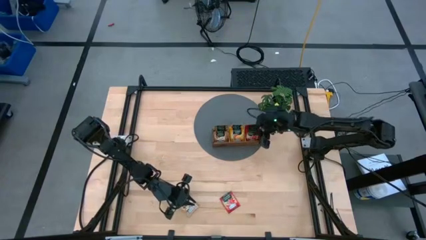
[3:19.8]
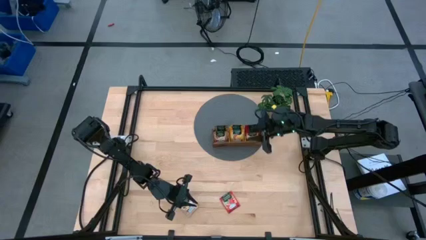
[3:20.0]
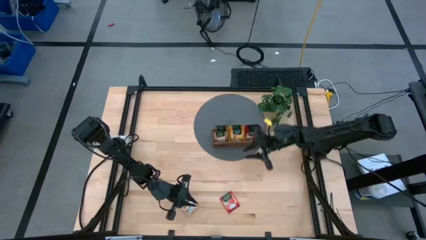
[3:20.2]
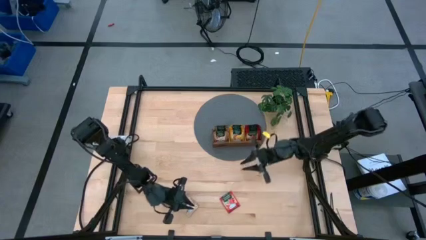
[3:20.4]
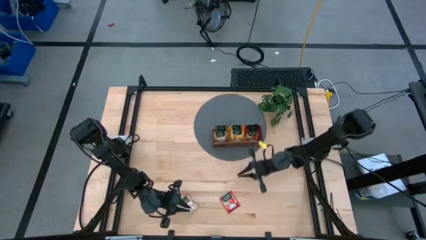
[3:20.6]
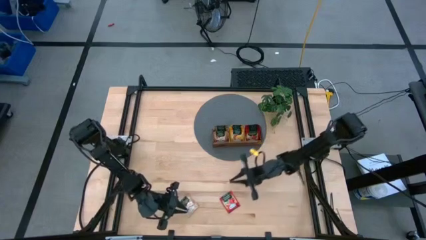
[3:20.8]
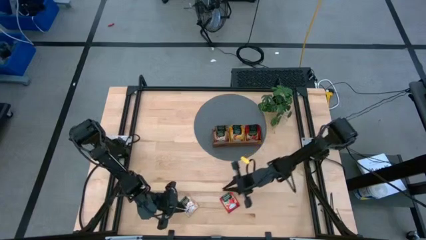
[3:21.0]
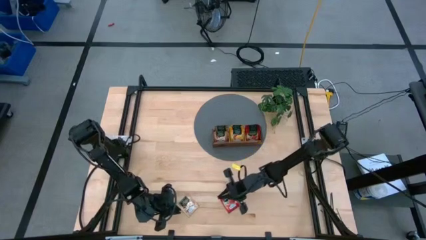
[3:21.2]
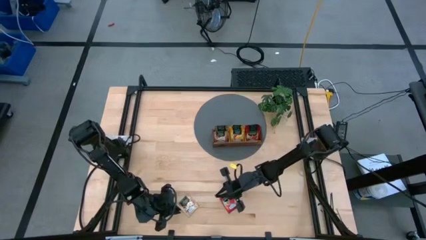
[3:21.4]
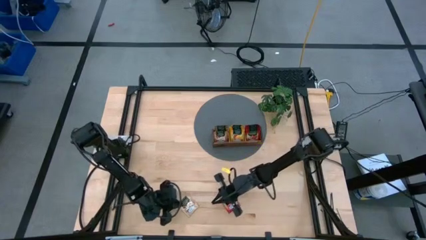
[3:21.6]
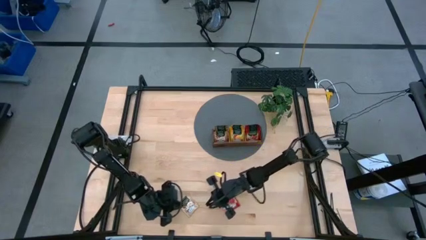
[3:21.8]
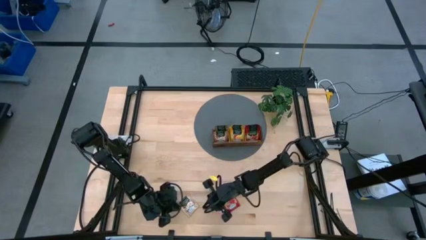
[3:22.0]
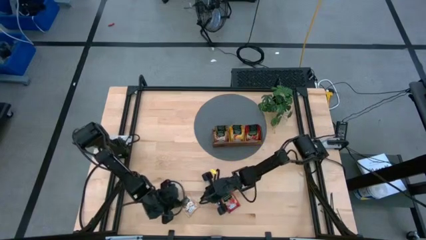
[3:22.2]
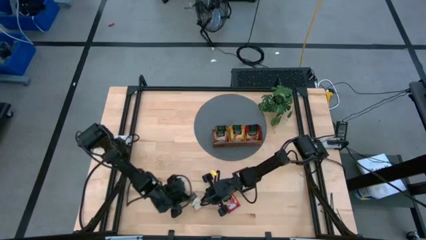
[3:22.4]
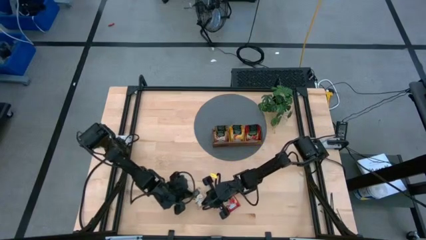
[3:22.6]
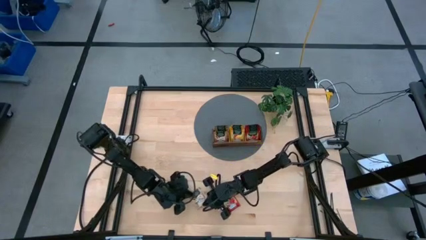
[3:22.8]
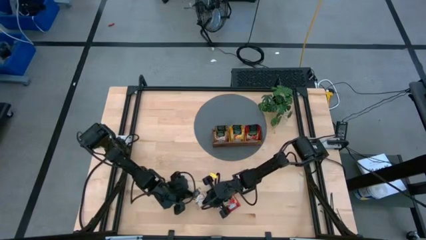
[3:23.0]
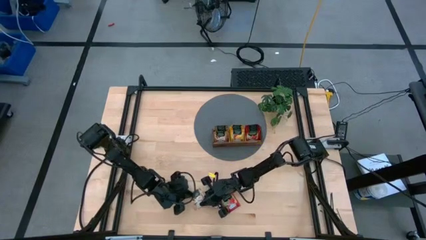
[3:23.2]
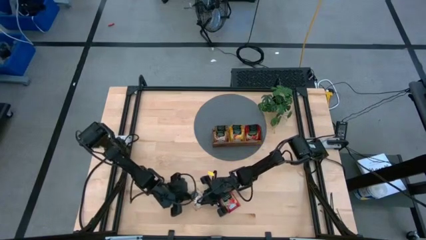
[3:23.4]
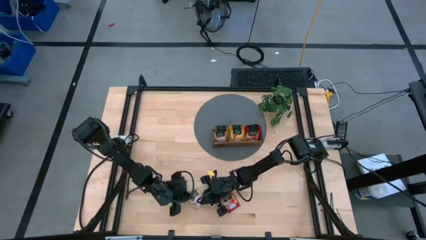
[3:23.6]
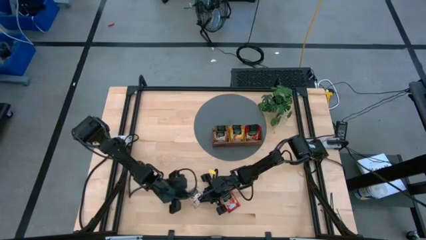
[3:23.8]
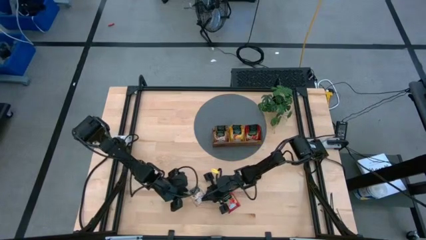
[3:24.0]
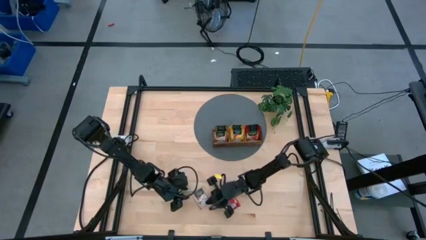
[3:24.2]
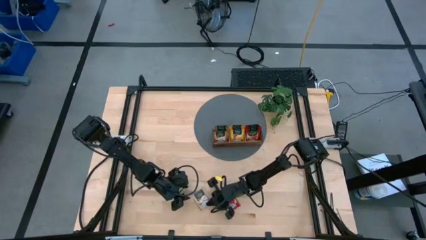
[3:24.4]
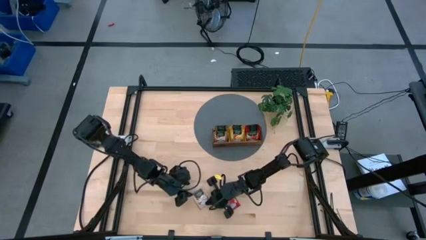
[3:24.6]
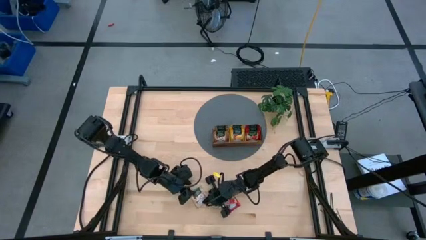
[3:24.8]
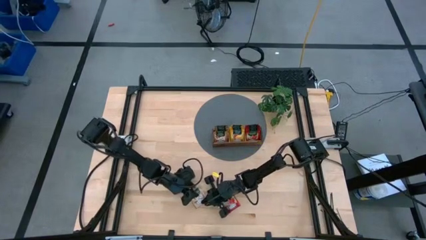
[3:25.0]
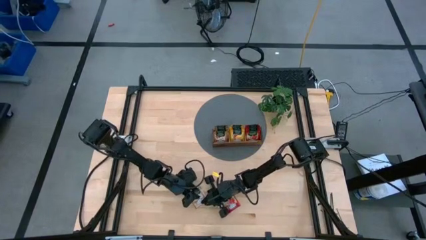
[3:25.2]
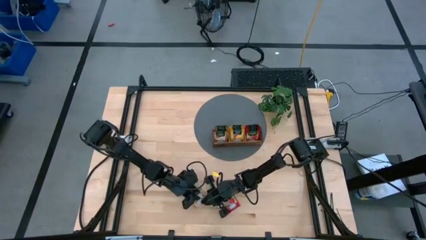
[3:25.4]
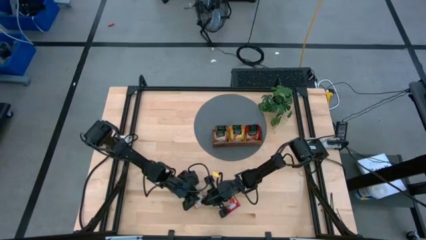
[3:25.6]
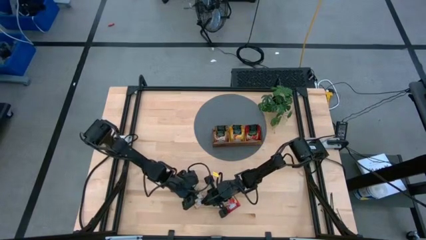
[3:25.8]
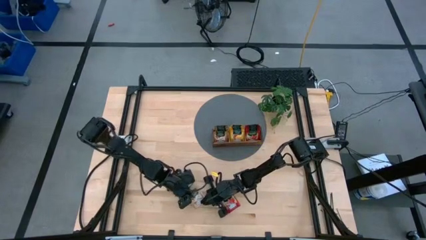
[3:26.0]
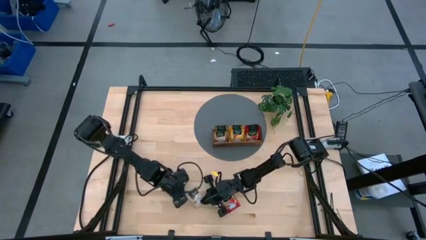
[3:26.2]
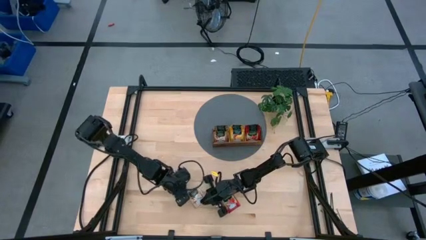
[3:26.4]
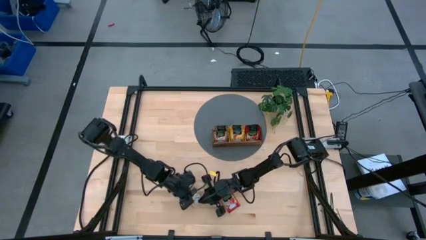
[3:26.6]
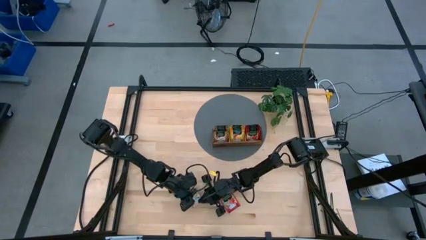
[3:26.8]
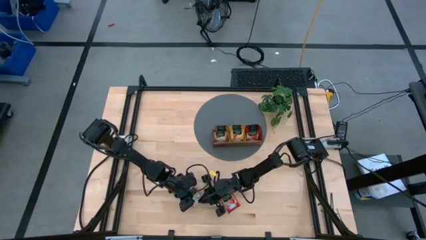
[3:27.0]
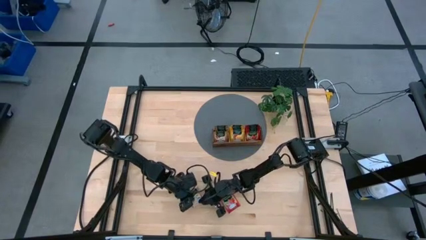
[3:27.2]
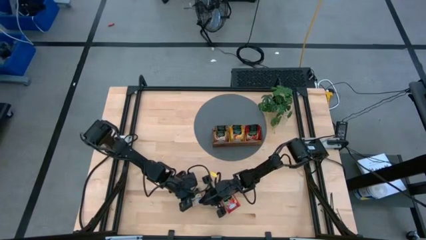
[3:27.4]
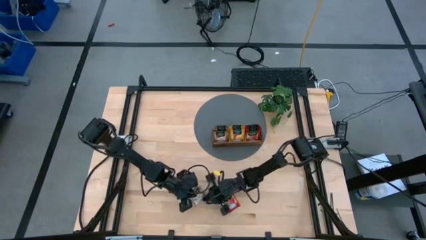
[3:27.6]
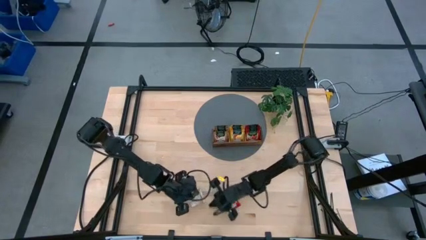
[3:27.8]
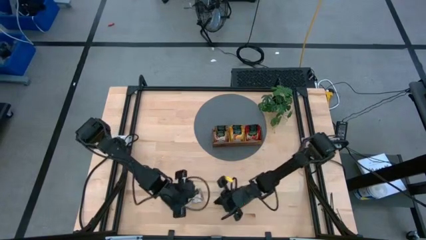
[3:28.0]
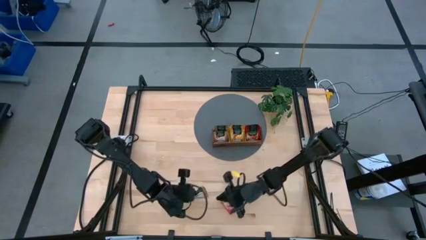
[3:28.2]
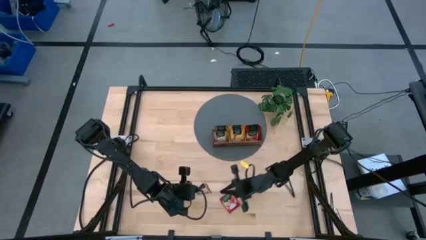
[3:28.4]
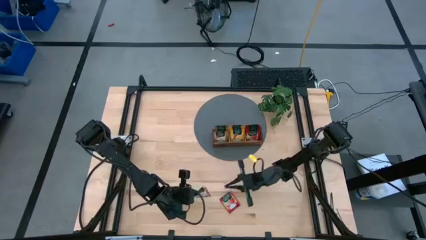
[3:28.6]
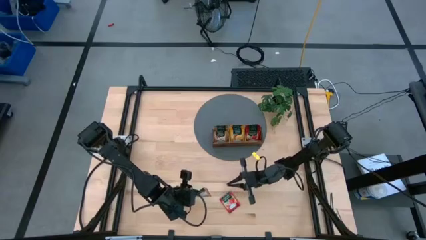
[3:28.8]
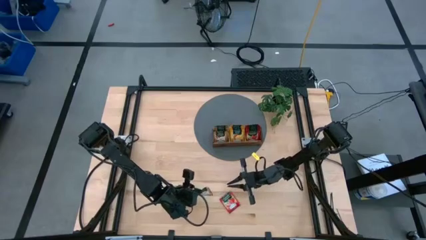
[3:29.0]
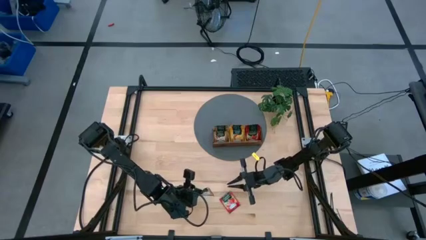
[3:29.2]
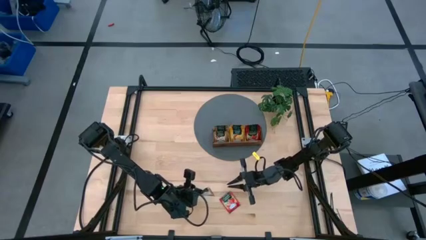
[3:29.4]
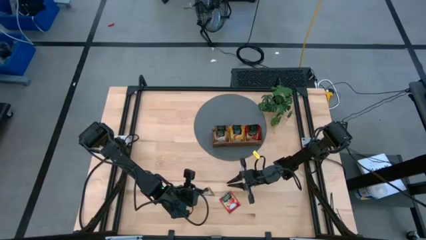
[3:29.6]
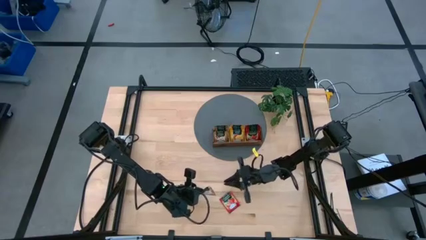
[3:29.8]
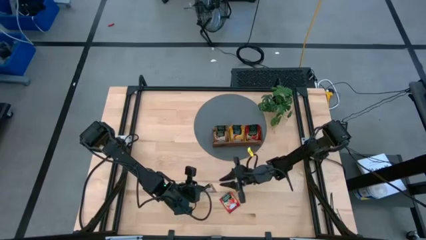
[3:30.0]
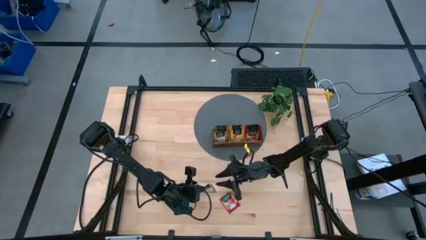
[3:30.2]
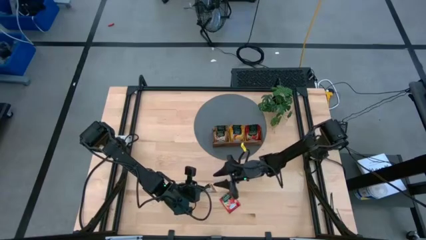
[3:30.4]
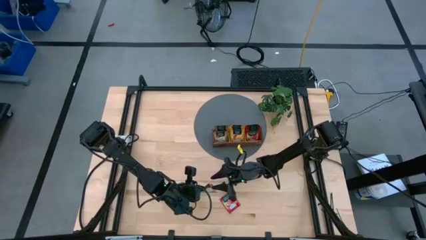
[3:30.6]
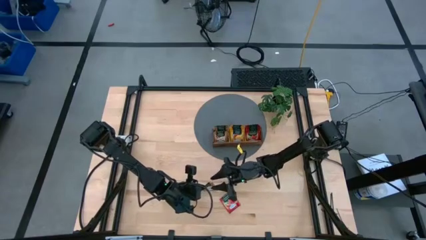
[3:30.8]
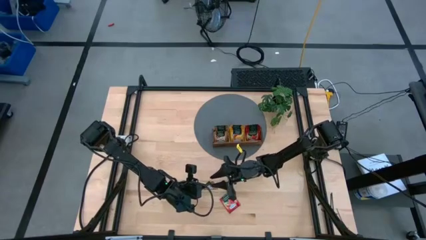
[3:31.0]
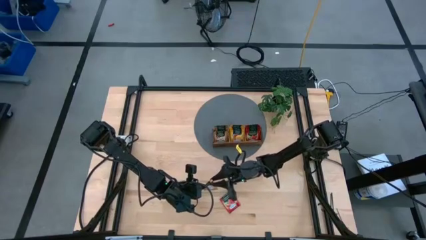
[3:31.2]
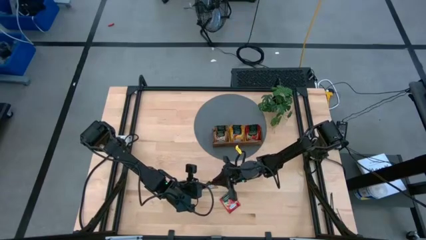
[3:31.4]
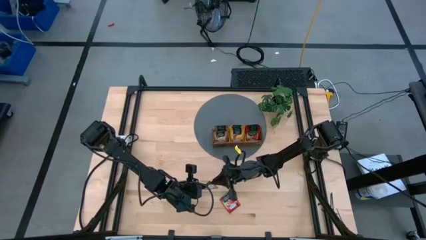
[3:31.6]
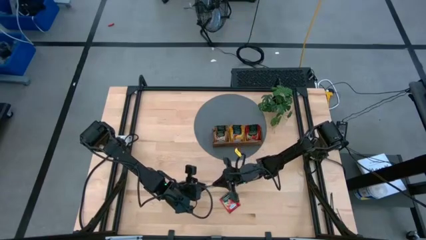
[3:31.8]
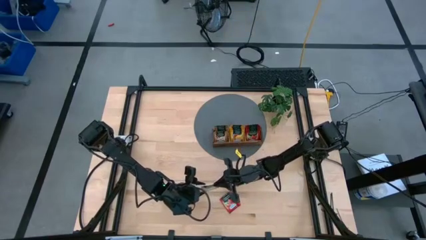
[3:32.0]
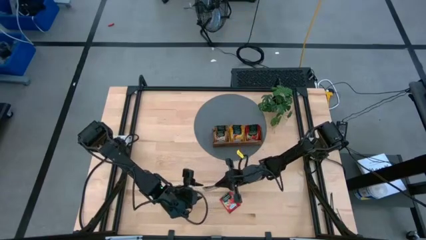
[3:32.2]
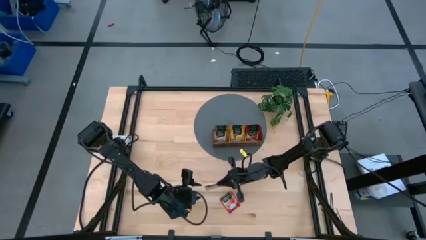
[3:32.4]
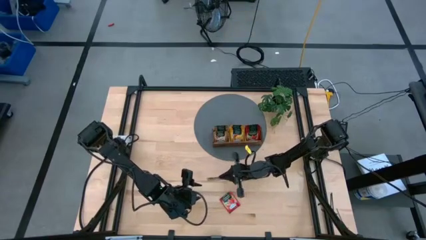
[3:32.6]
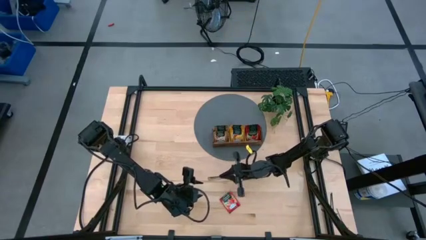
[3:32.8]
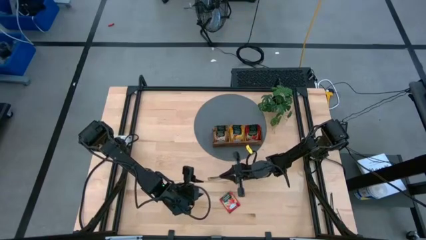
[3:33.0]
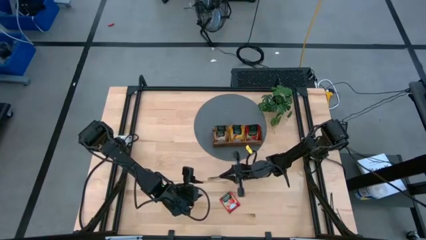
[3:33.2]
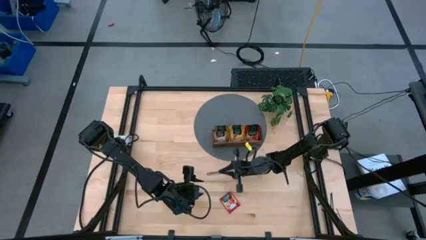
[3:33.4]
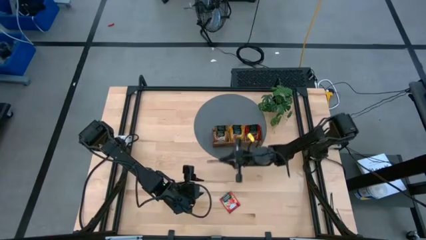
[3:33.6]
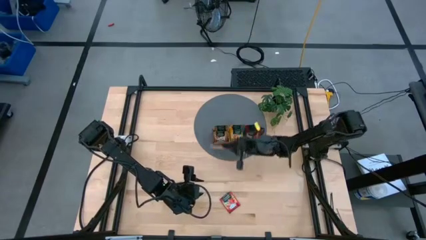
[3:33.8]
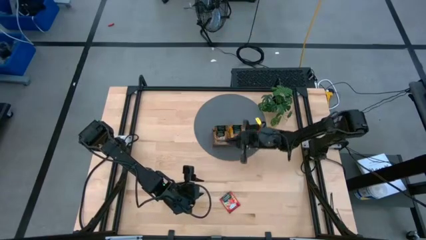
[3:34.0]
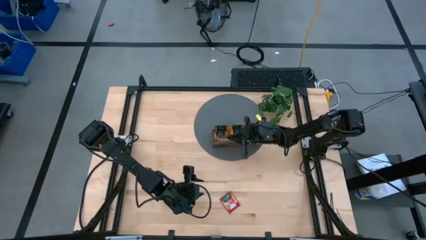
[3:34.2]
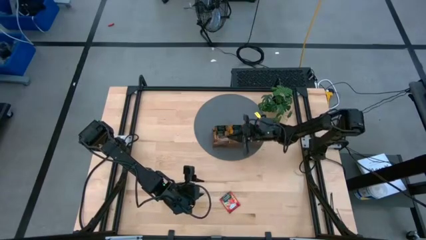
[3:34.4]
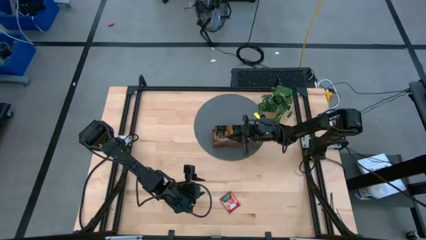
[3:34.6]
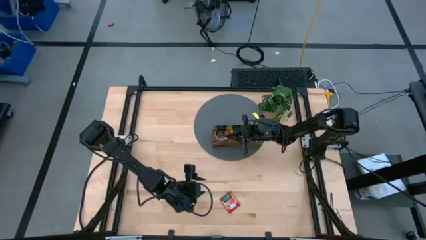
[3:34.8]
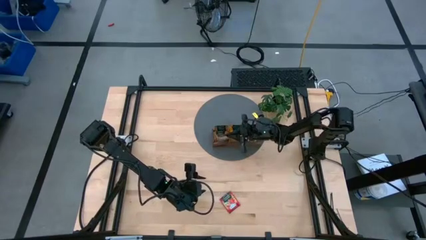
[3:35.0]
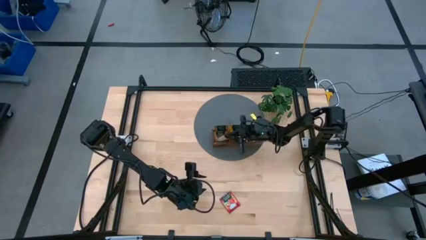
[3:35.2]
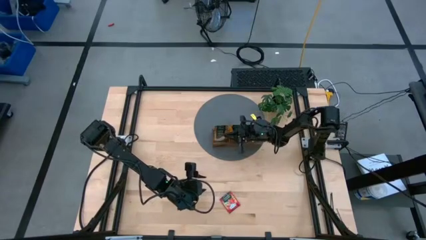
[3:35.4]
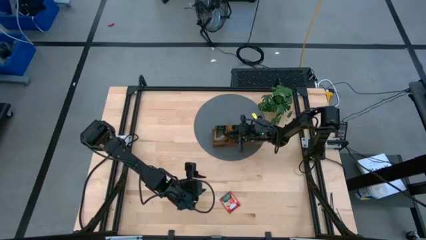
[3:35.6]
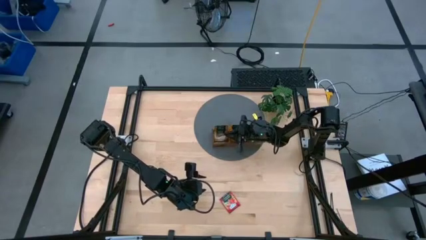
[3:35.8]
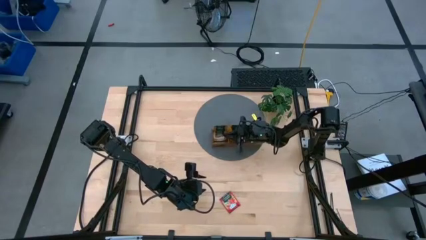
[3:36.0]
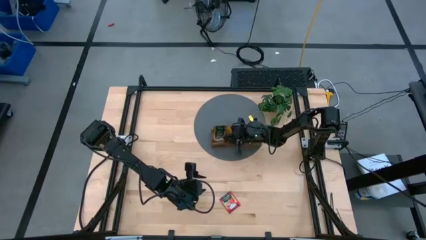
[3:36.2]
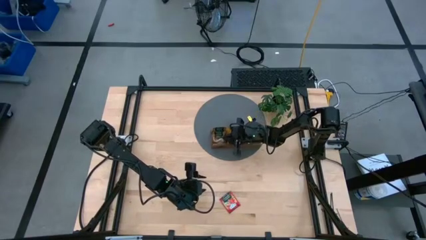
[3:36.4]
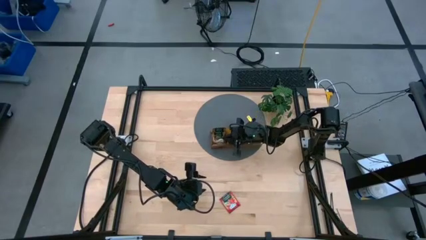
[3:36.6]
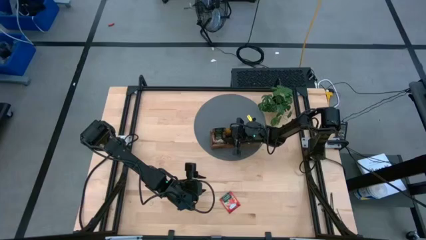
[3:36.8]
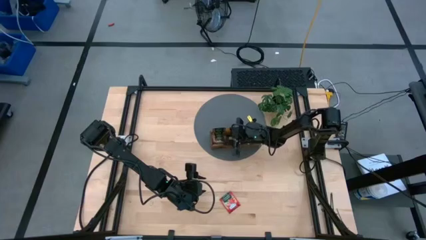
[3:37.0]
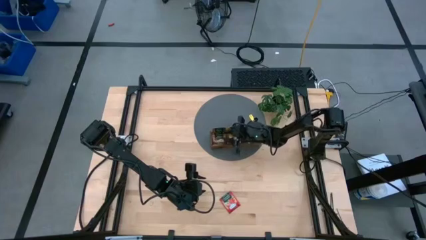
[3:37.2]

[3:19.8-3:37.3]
Task: Pick & Place Tea
Put the brown tea packet into the left section of the wooden organizer
